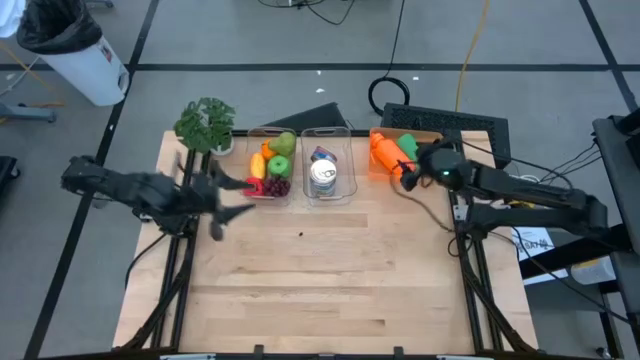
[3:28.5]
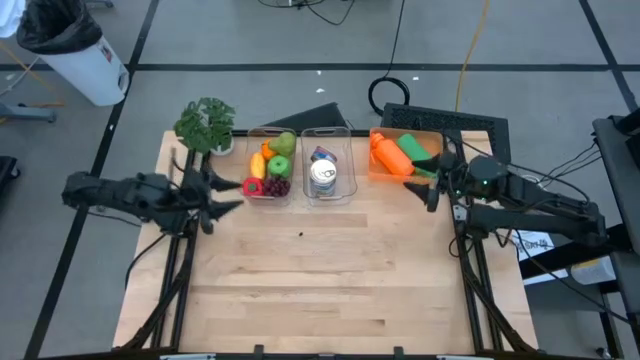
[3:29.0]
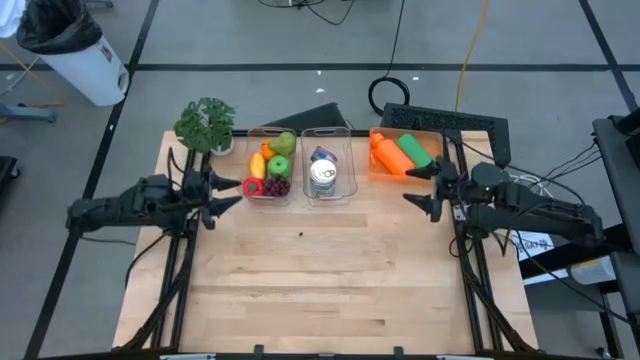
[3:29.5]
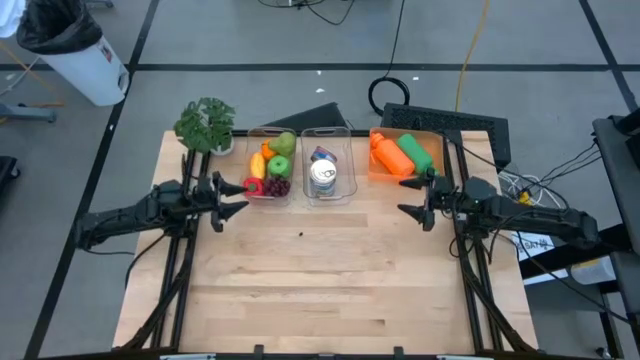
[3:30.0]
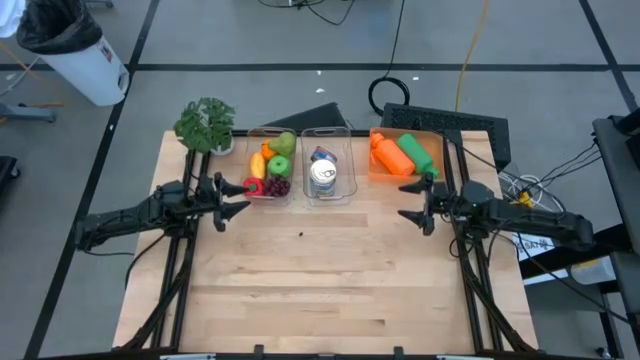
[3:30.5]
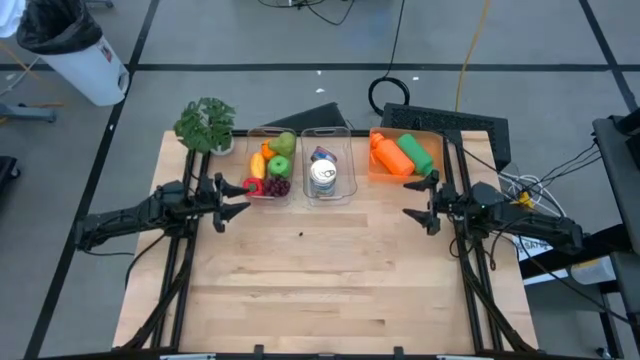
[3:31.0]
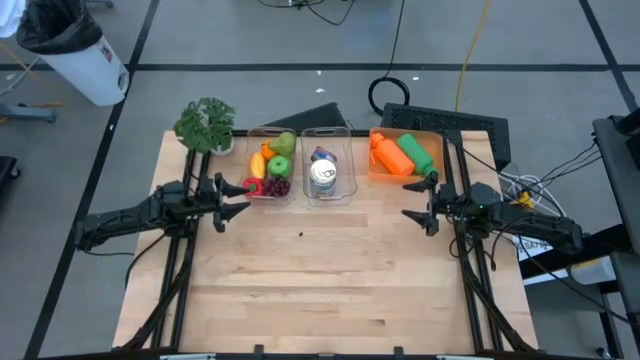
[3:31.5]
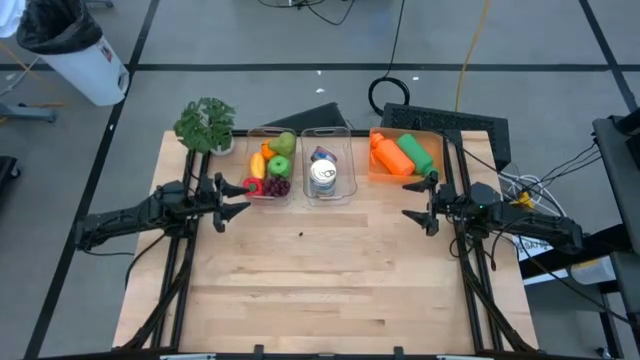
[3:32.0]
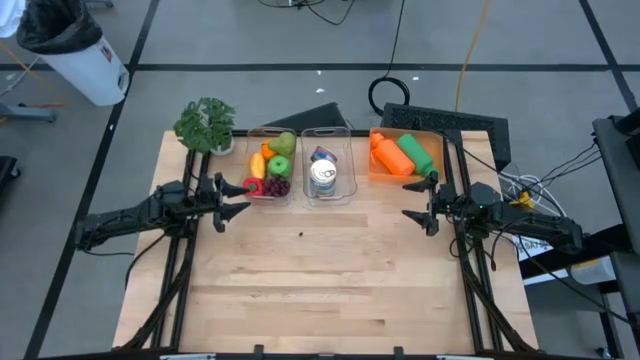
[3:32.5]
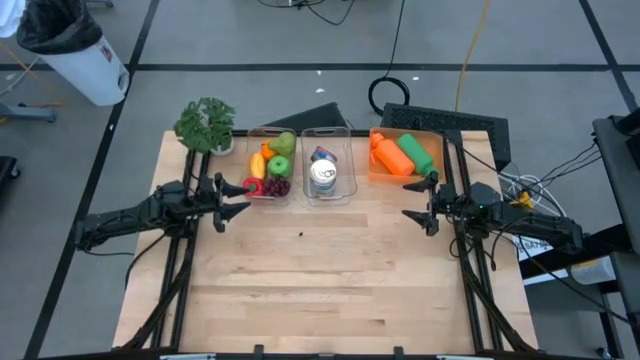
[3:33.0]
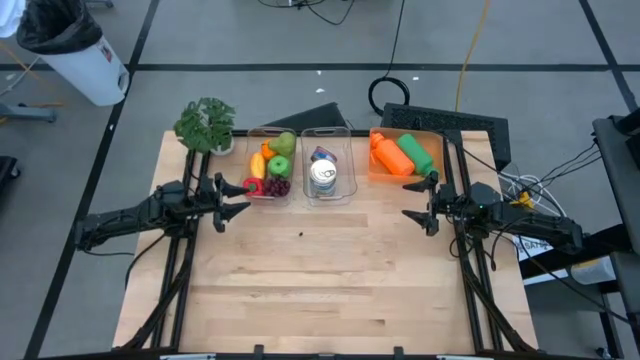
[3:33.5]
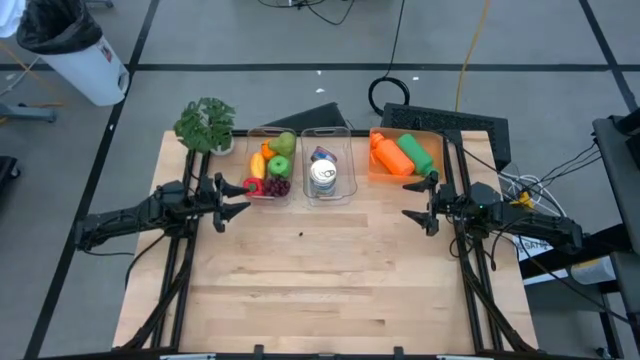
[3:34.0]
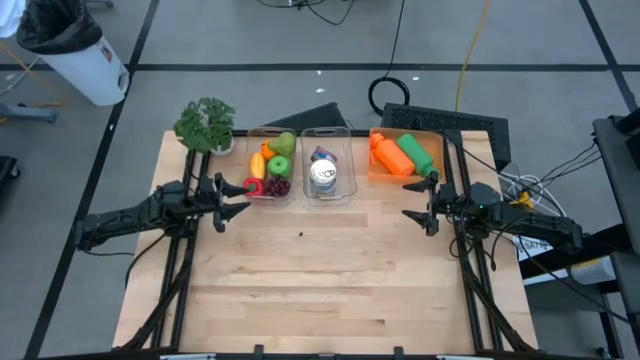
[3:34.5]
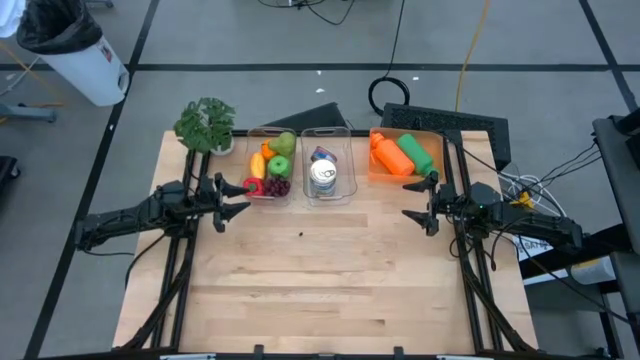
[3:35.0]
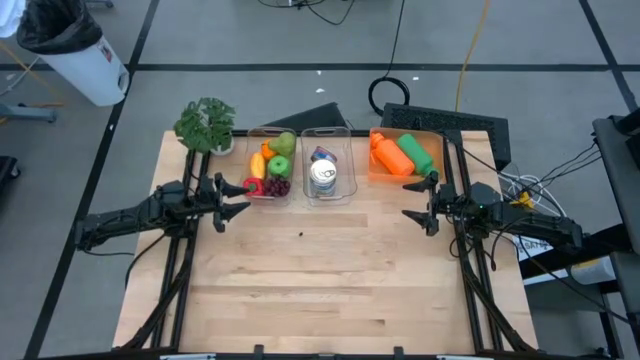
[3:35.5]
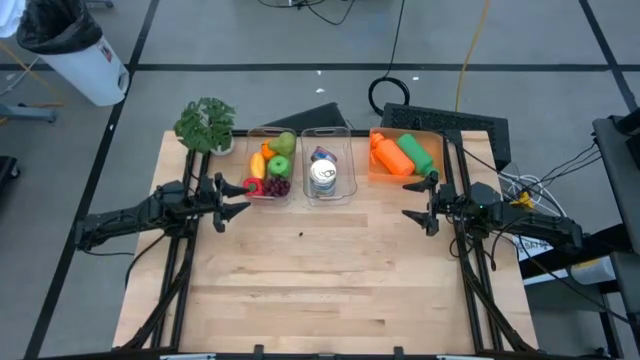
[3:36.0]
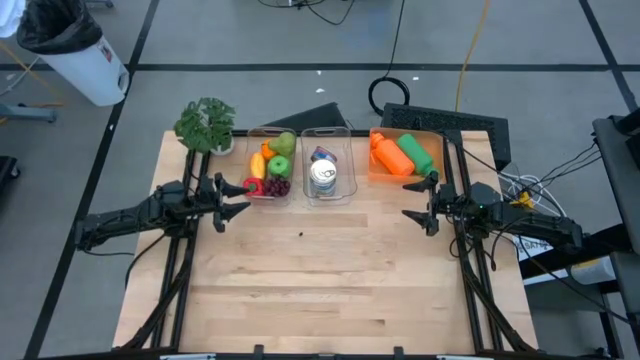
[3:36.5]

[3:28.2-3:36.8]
Task: Pick & Place Food Item
Return to Home Position

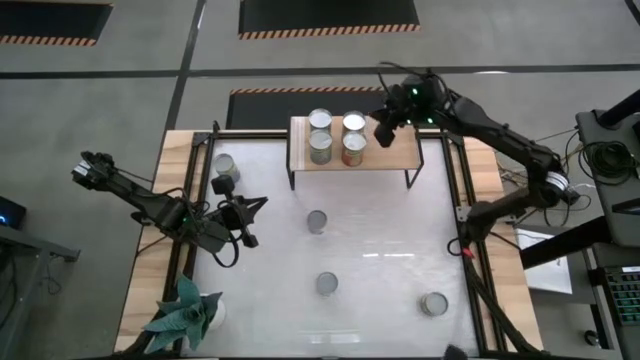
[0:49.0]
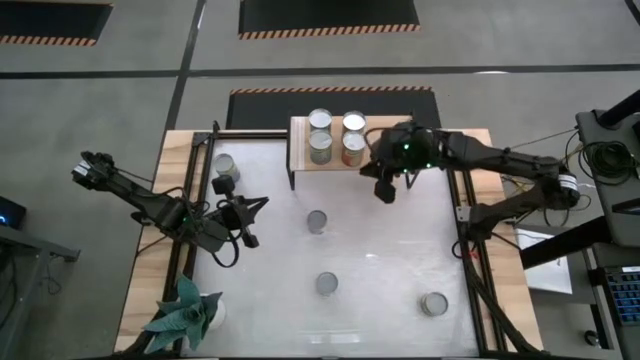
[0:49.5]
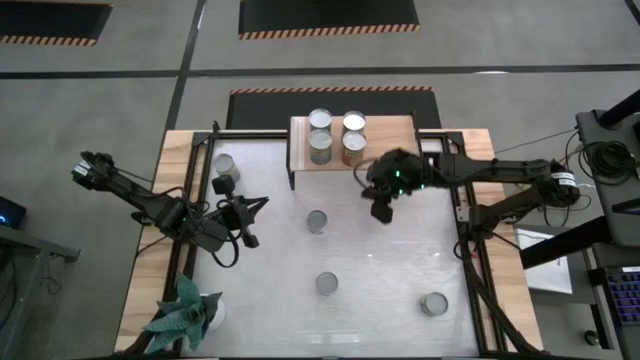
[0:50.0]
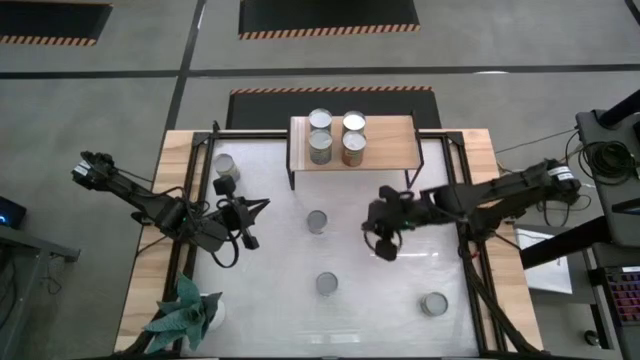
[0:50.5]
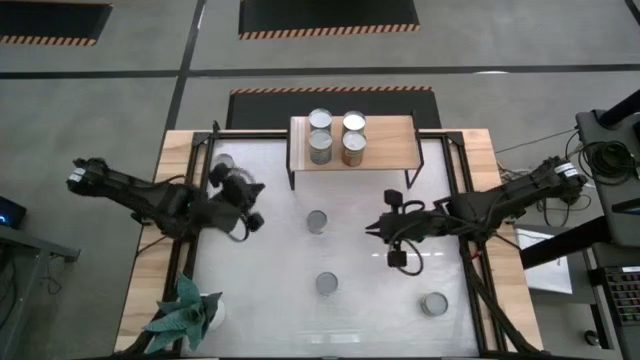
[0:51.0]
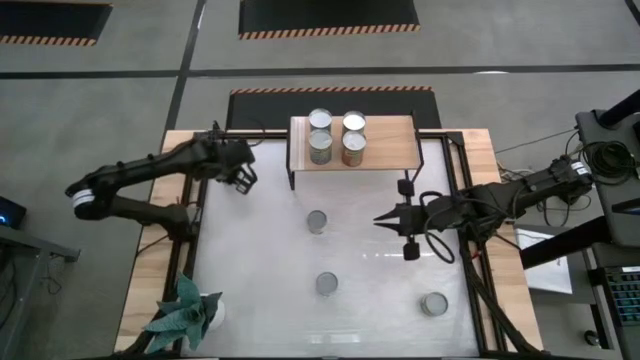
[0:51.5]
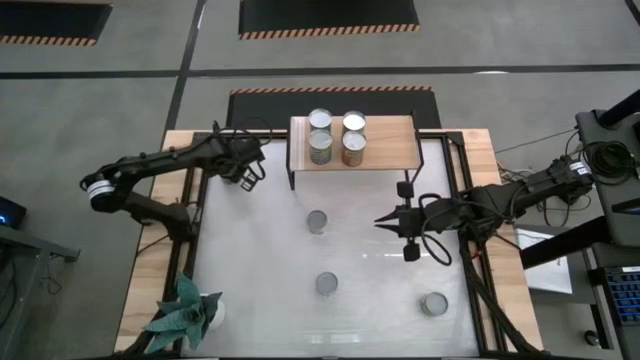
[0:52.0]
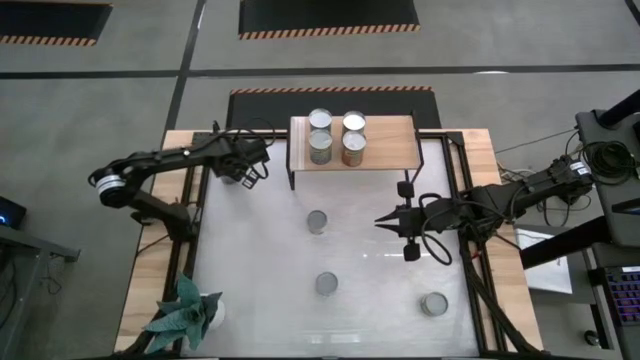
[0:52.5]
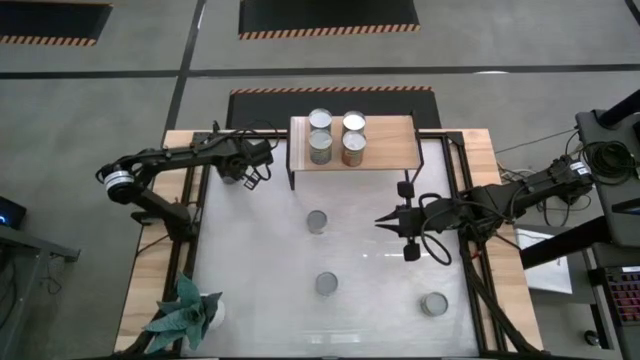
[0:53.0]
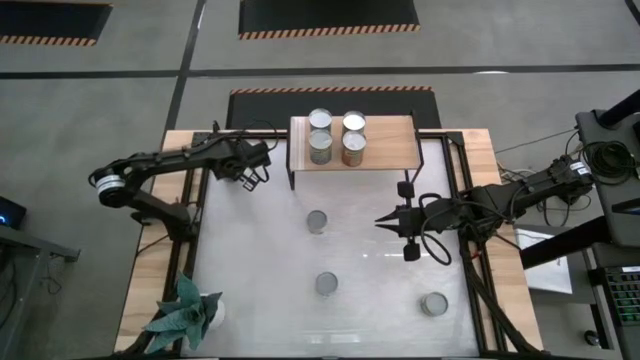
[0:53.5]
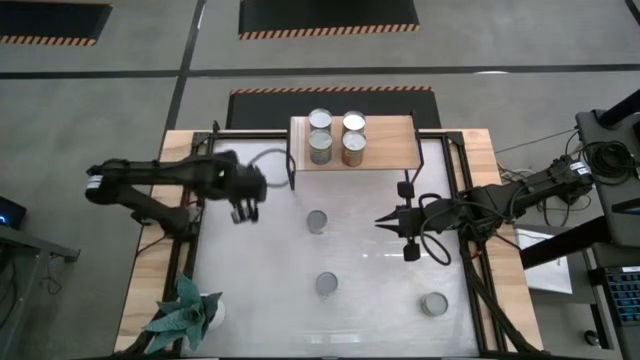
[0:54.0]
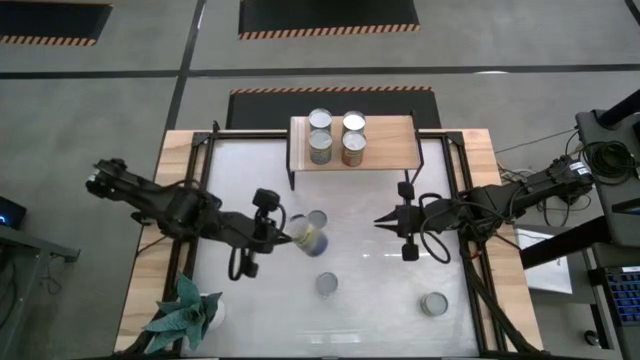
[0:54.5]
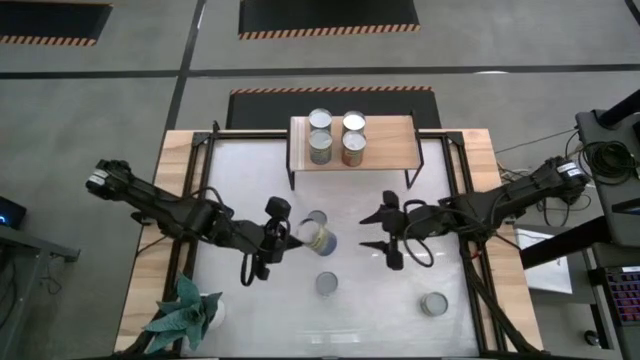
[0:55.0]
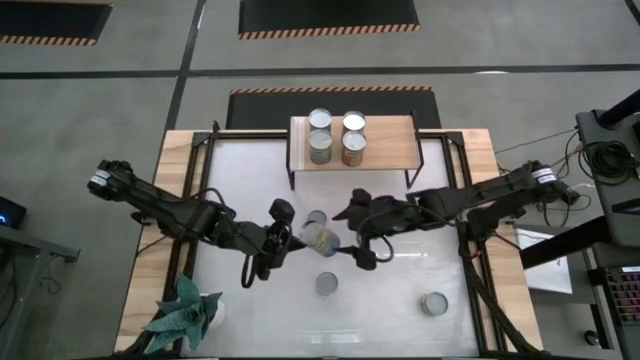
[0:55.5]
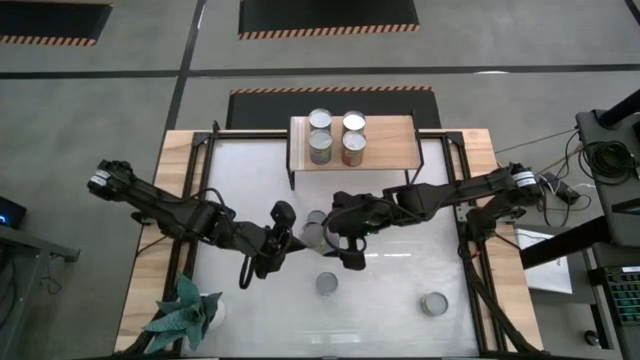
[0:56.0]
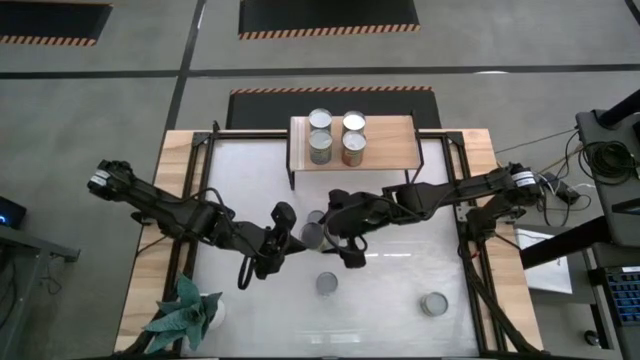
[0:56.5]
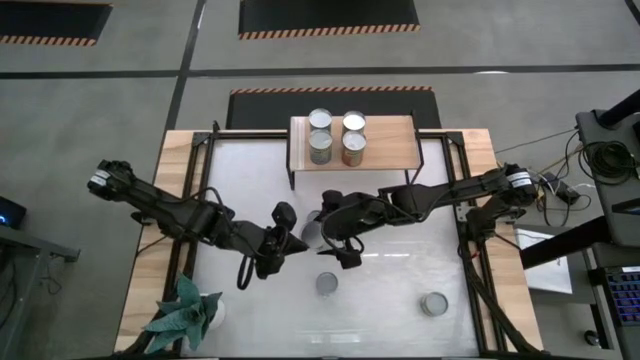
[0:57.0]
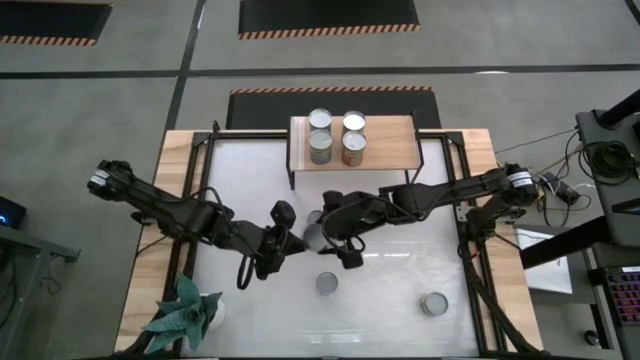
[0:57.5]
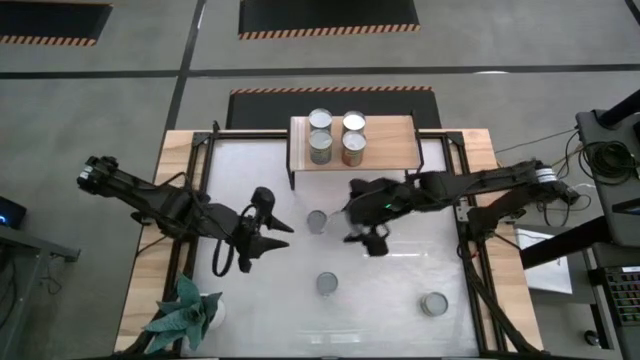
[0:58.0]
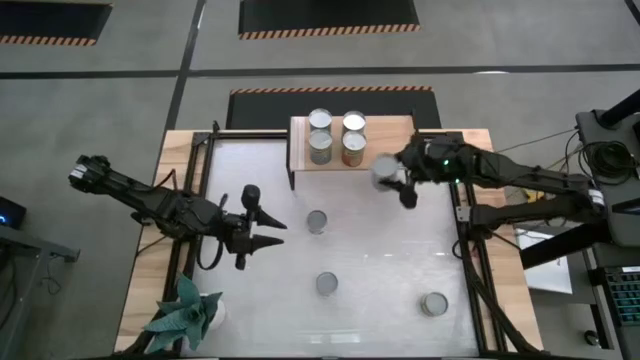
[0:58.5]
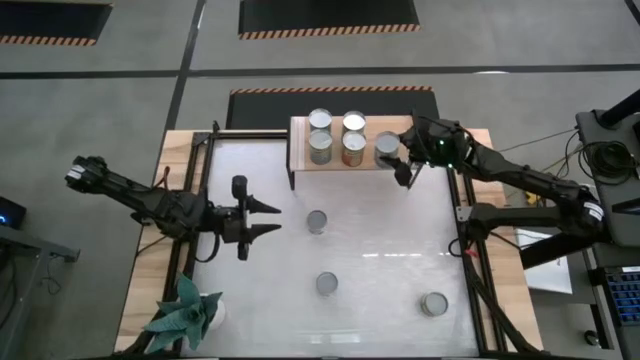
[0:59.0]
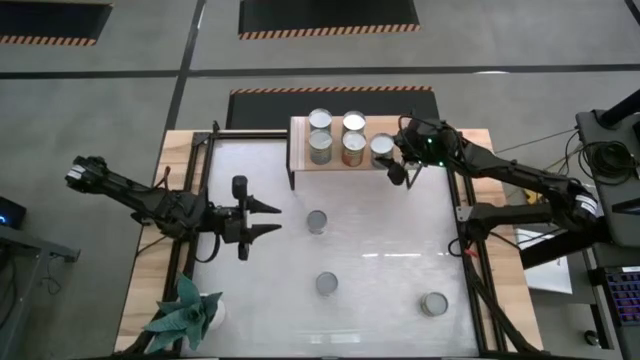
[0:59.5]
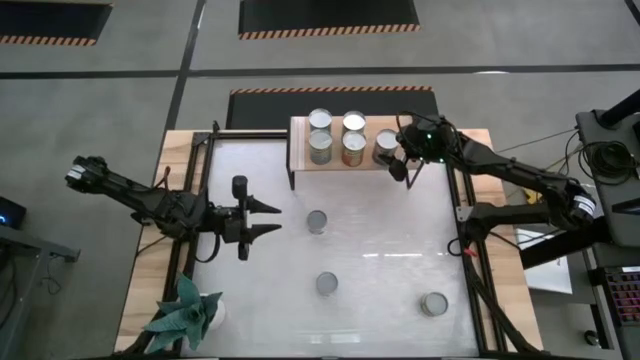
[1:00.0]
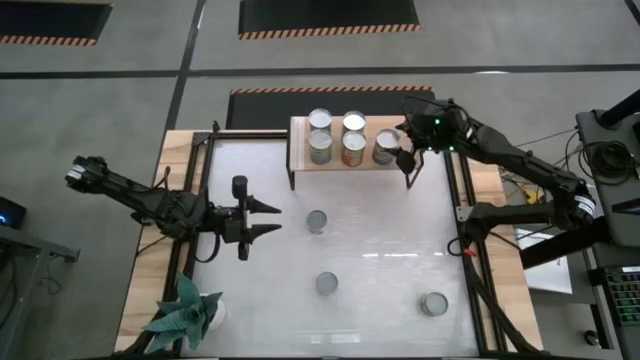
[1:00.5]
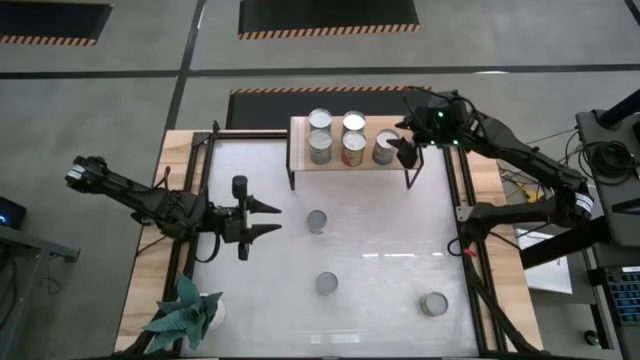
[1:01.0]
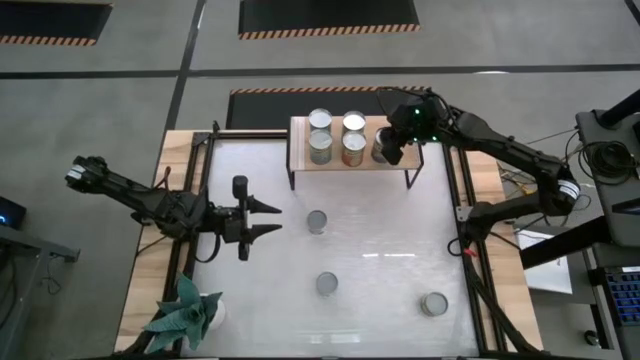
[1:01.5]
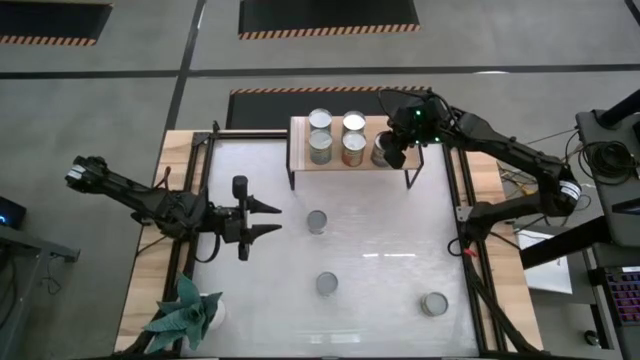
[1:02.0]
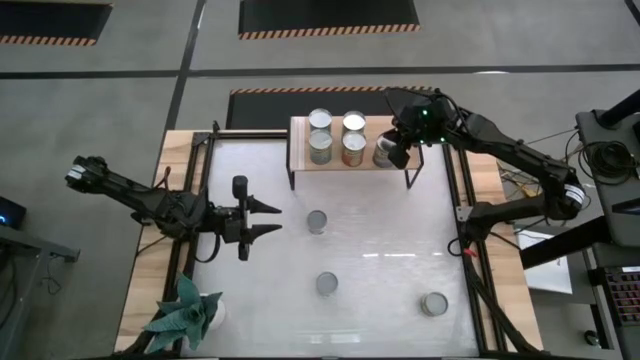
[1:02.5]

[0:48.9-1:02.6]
Task: Pick and place cans onto a shelf
Put the canned peas on the shelf
